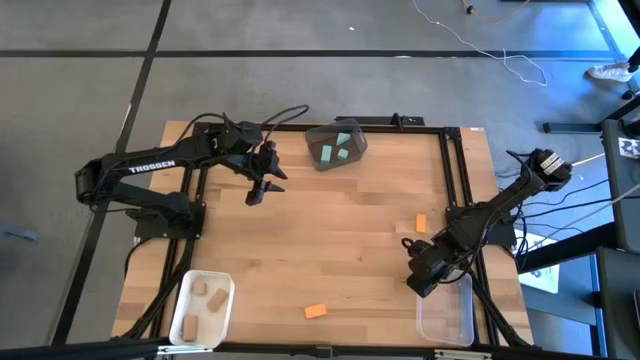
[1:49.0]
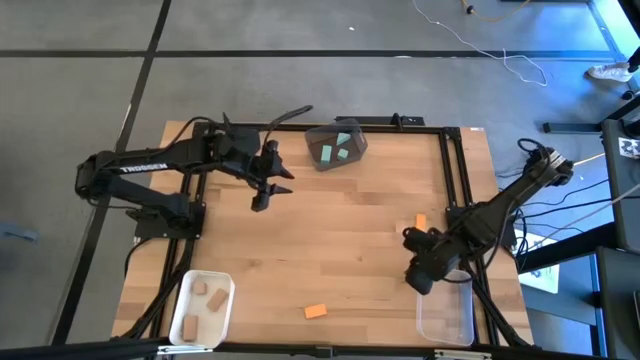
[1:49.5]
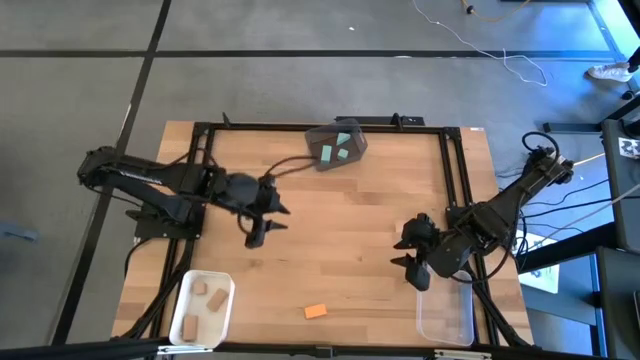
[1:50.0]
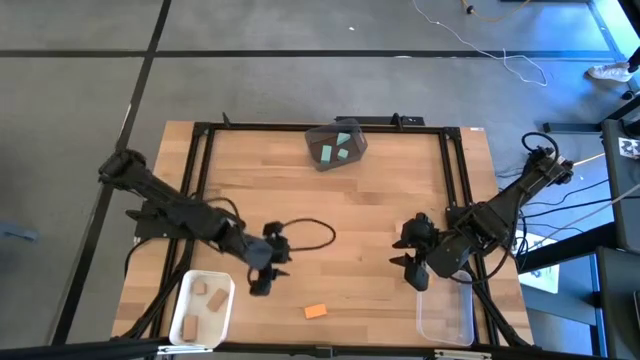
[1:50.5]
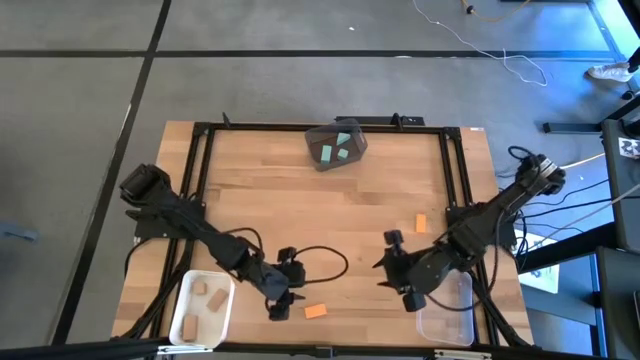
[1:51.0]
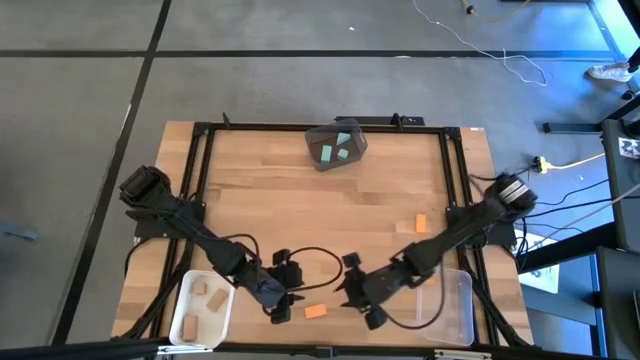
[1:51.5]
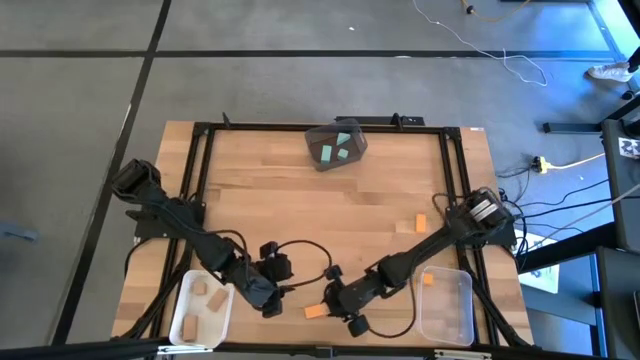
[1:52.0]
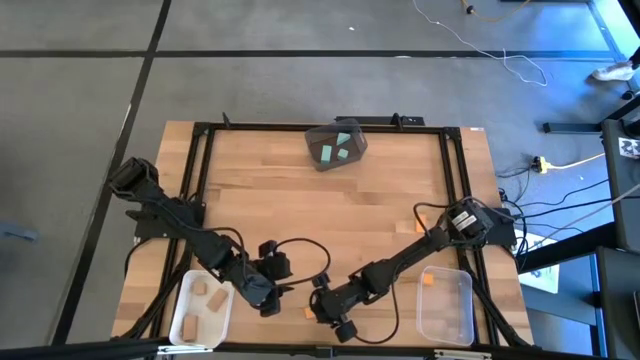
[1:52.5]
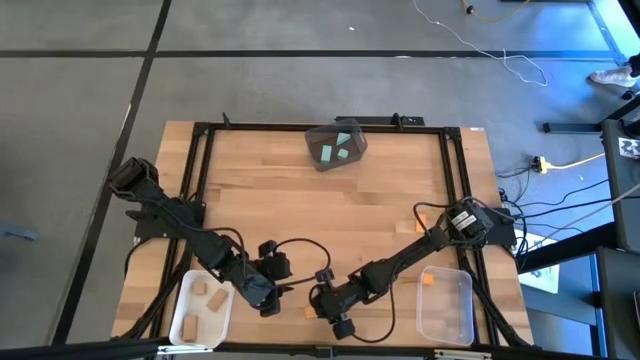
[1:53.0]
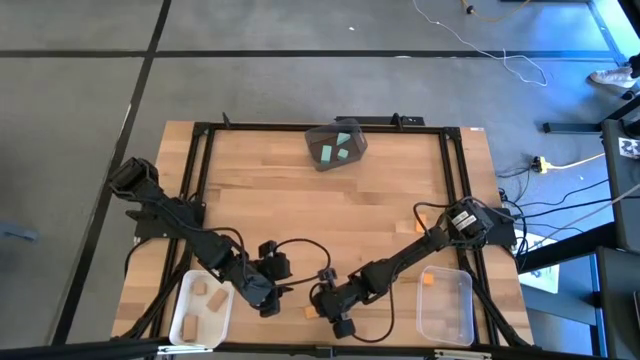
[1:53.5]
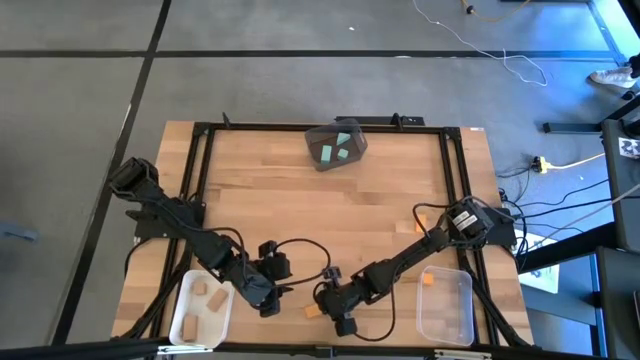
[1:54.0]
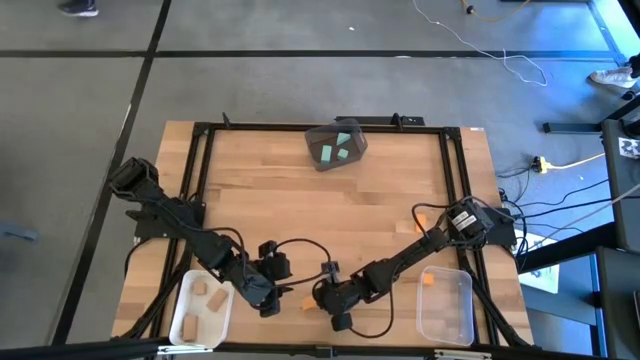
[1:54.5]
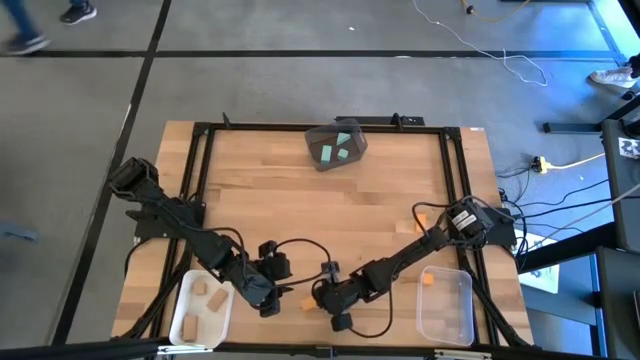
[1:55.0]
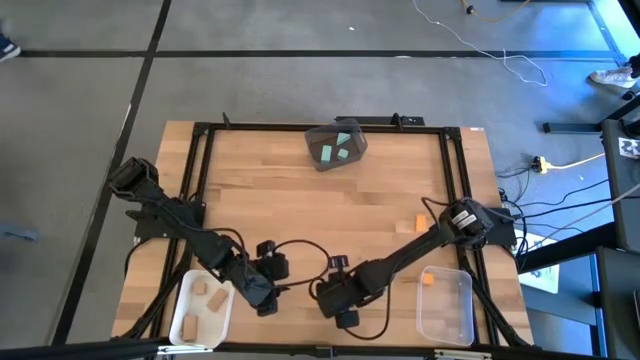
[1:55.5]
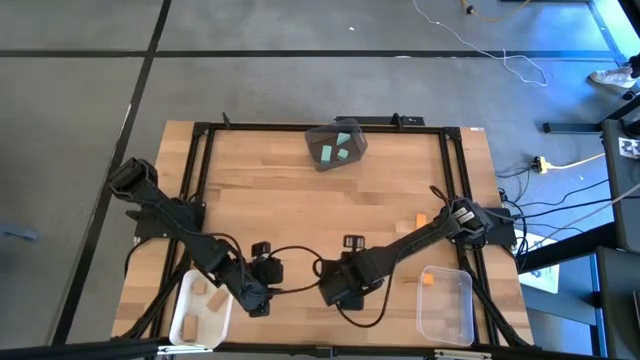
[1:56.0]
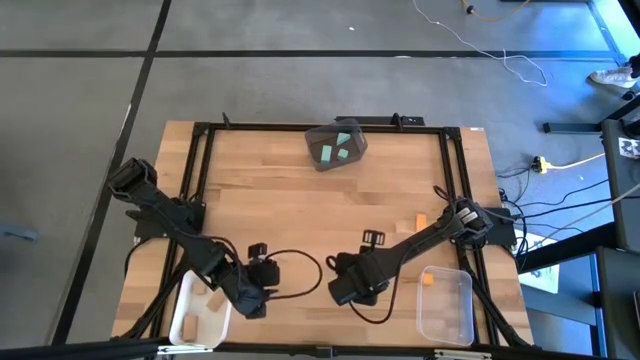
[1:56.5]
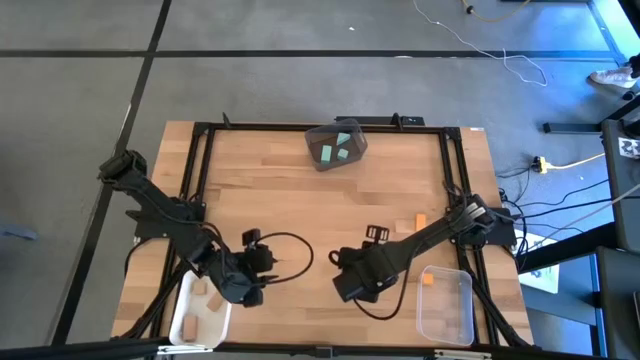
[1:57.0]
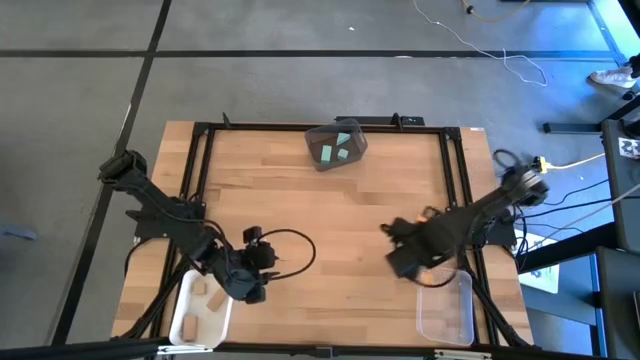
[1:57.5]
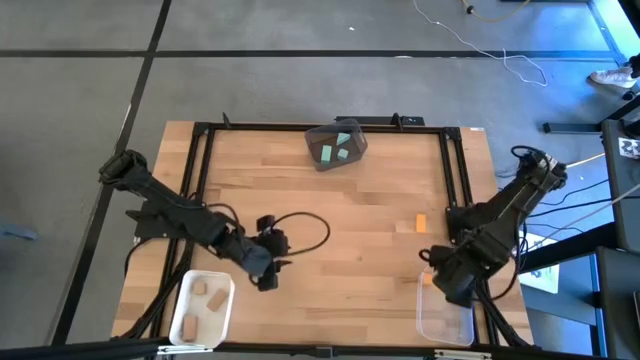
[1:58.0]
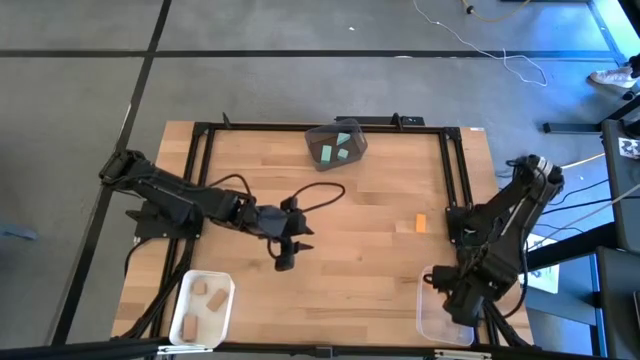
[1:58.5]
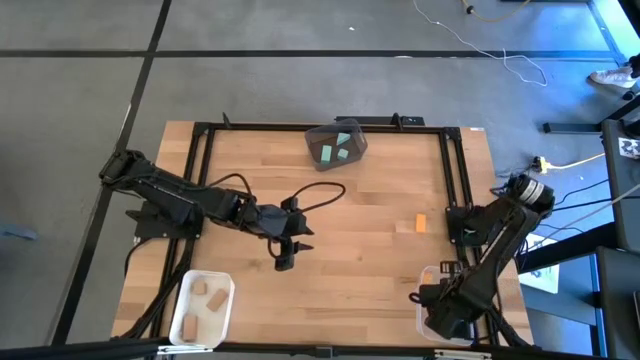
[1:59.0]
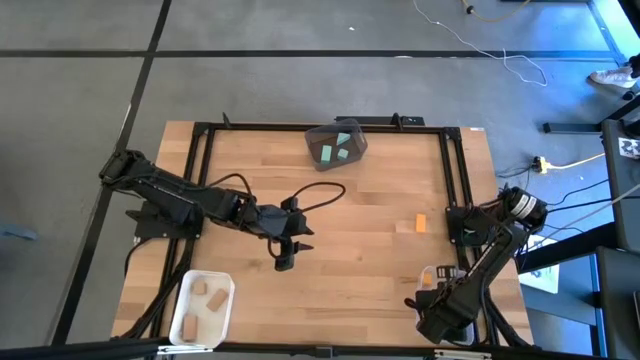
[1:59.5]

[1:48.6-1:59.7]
Task: Sort & place blocks by color
Put the bottom orange block into the transparent bin

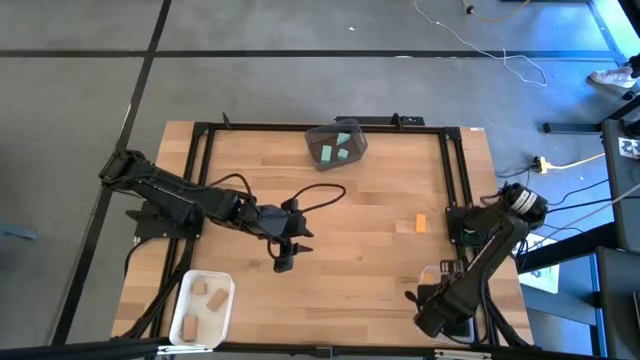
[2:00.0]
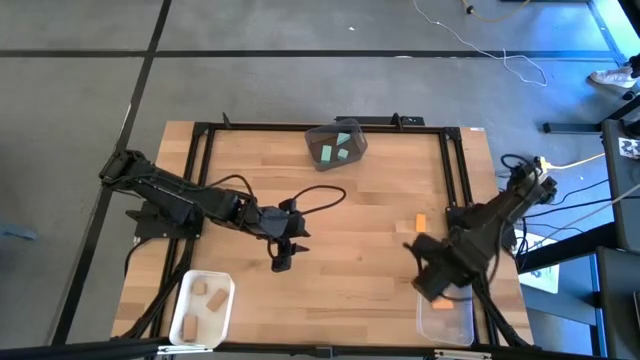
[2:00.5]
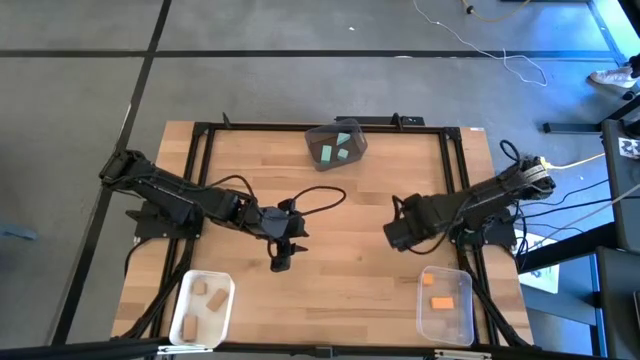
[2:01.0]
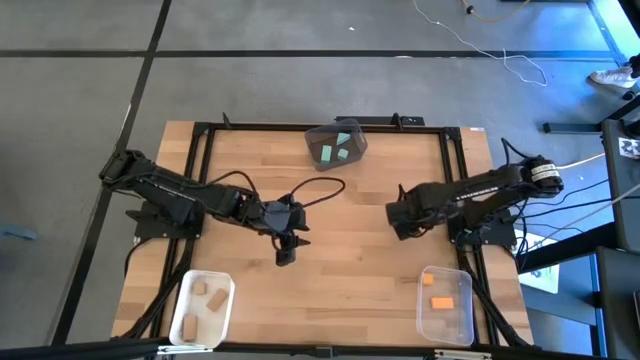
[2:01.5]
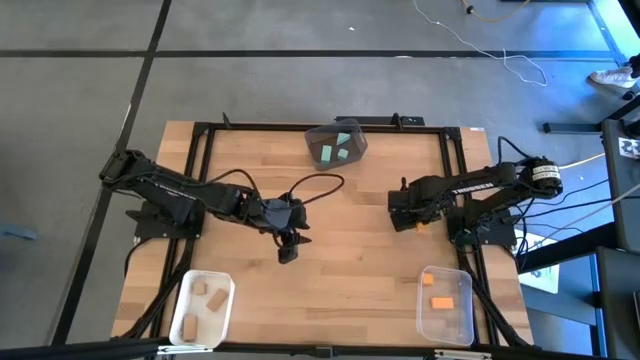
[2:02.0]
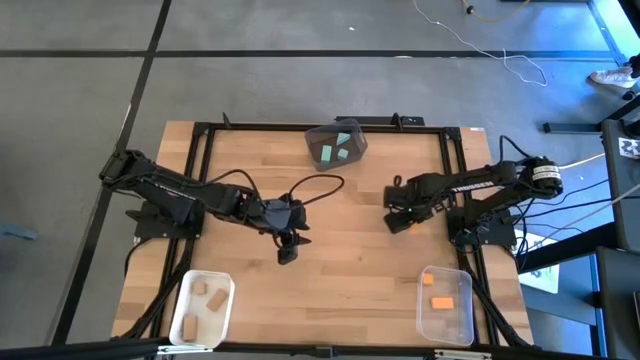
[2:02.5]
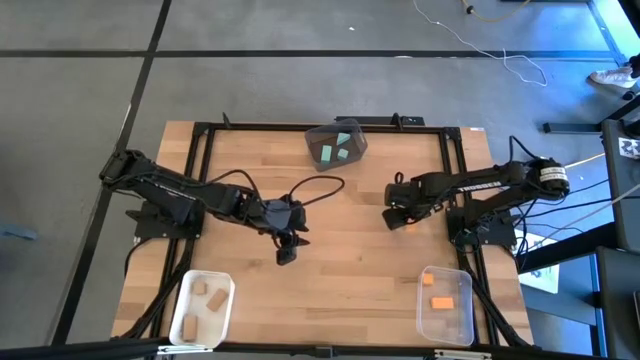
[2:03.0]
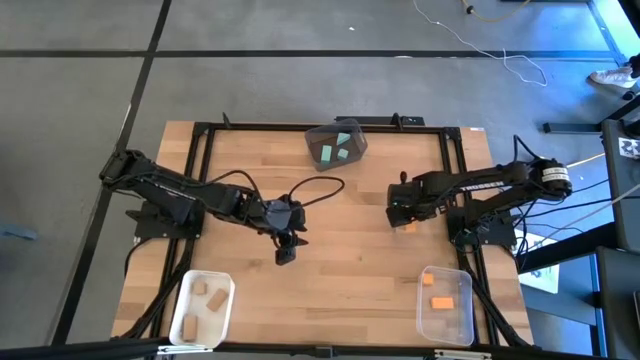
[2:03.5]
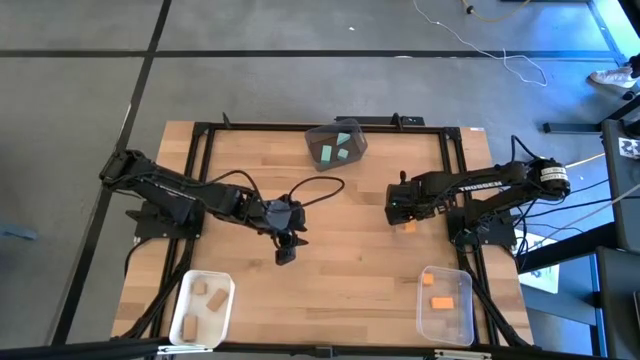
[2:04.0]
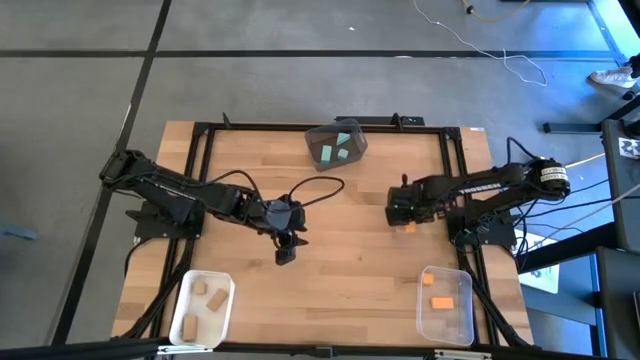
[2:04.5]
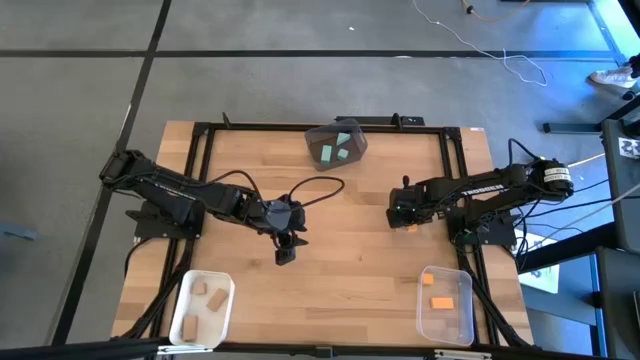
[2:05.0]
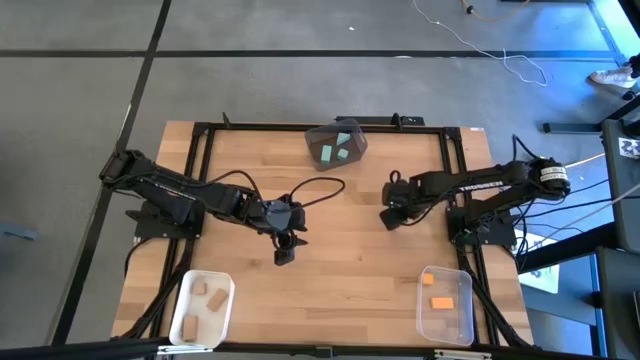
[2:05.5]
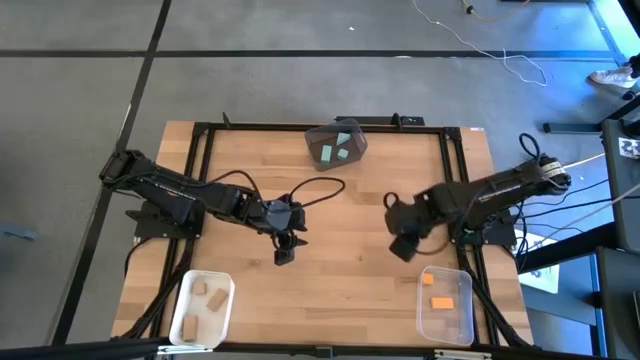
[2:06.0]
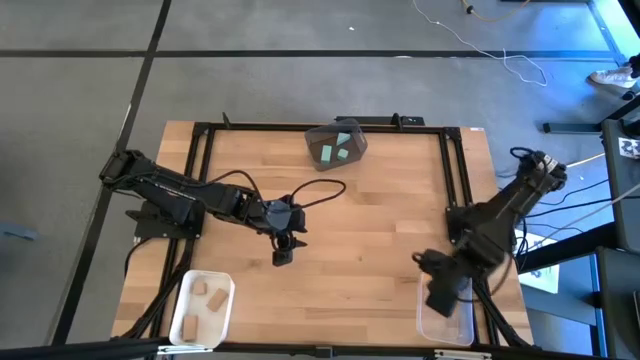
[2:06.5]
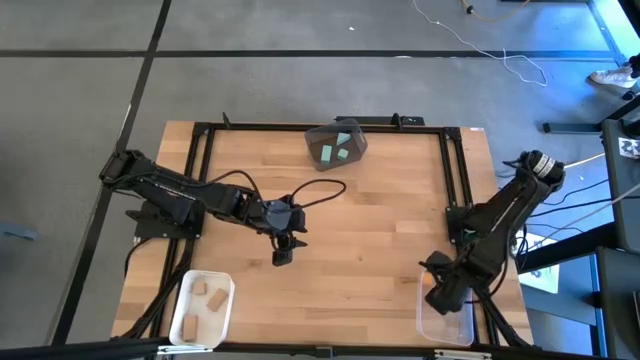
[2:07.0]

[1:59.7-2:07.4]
Put the orange block into the transparent bin
